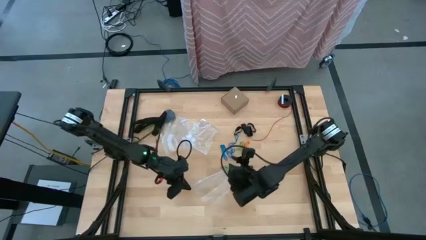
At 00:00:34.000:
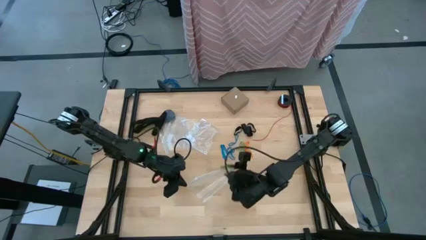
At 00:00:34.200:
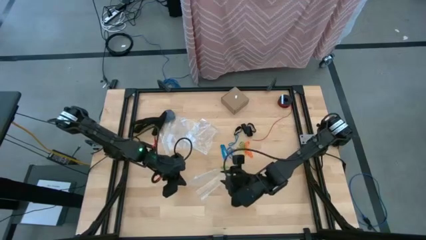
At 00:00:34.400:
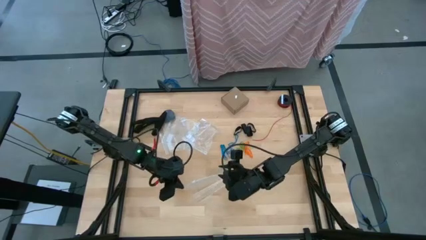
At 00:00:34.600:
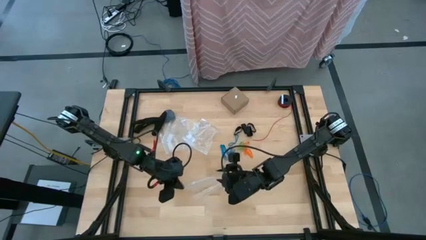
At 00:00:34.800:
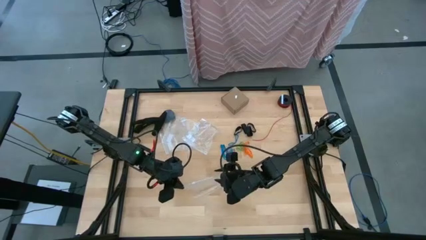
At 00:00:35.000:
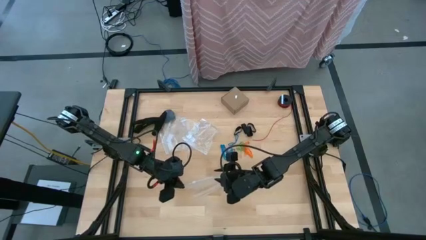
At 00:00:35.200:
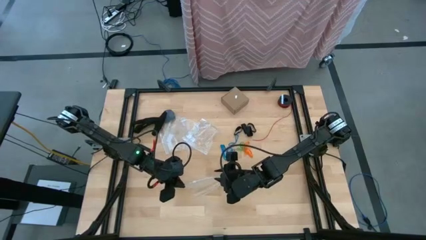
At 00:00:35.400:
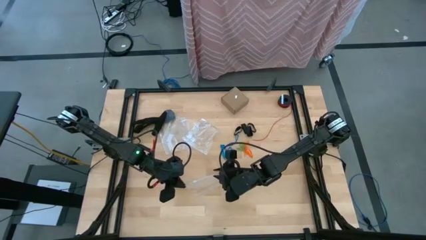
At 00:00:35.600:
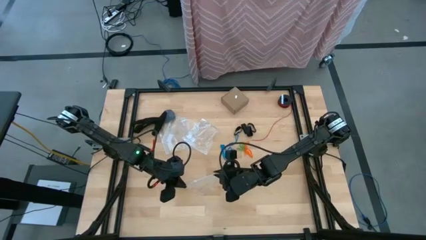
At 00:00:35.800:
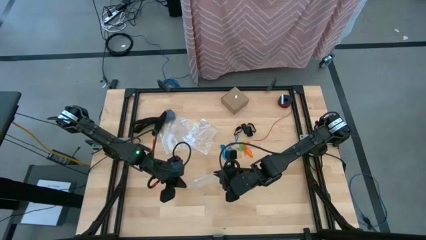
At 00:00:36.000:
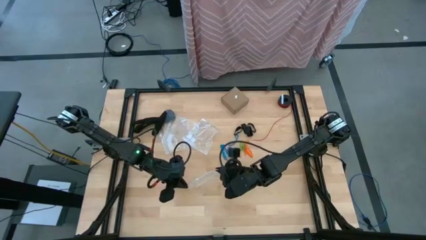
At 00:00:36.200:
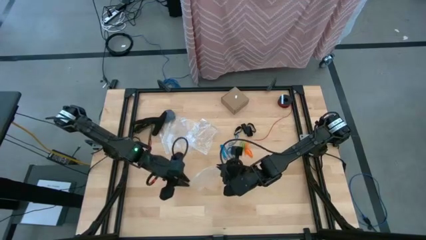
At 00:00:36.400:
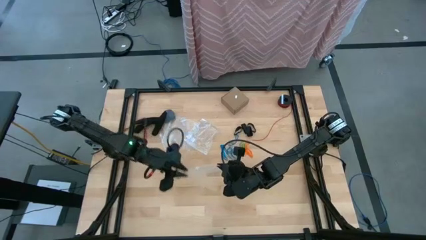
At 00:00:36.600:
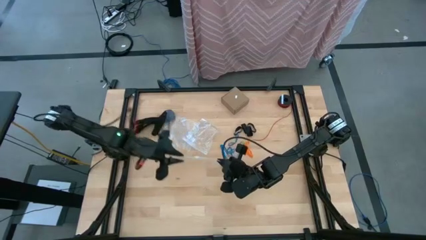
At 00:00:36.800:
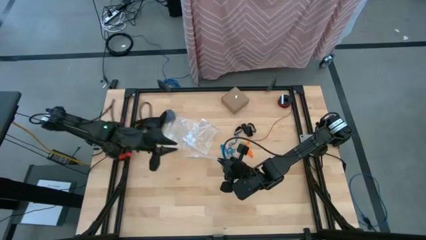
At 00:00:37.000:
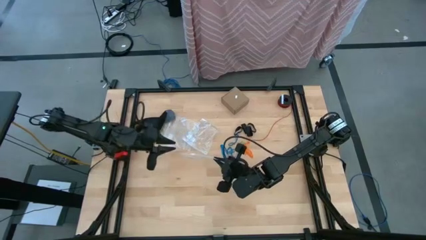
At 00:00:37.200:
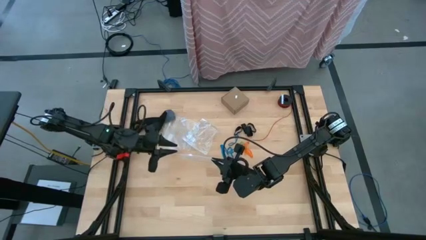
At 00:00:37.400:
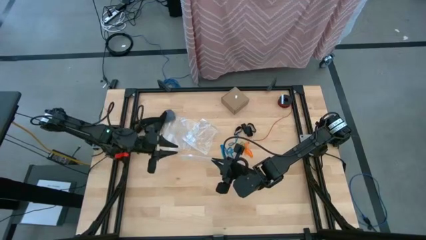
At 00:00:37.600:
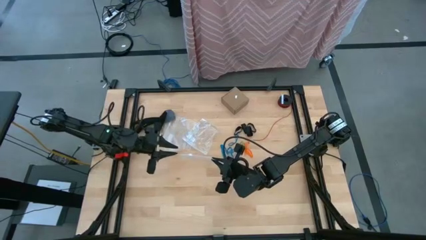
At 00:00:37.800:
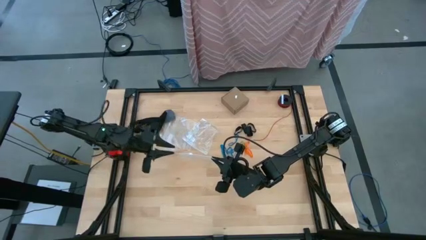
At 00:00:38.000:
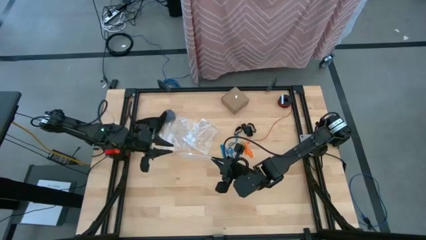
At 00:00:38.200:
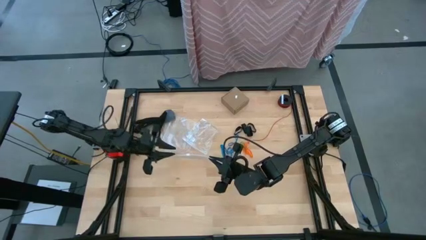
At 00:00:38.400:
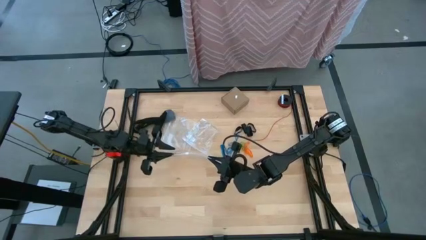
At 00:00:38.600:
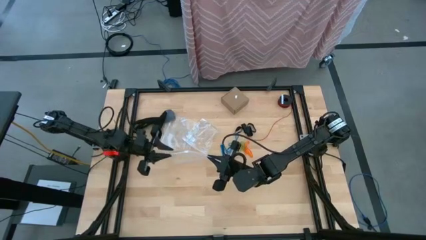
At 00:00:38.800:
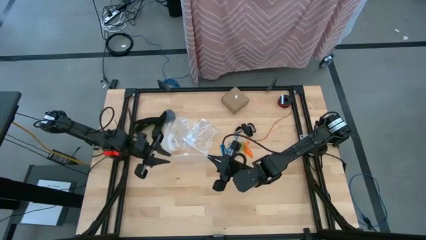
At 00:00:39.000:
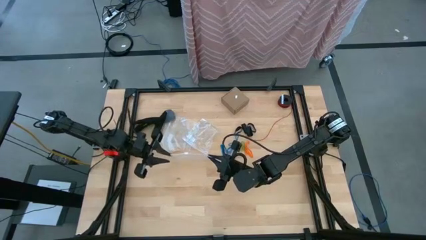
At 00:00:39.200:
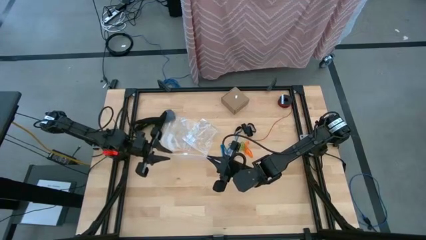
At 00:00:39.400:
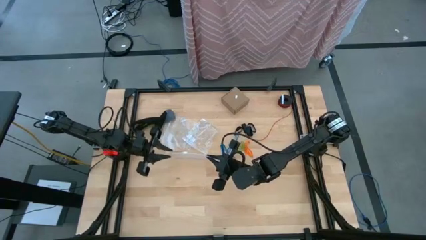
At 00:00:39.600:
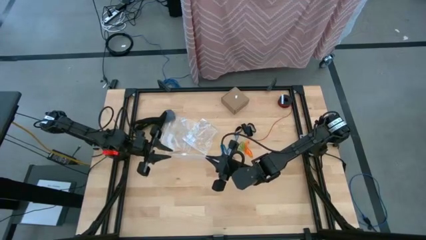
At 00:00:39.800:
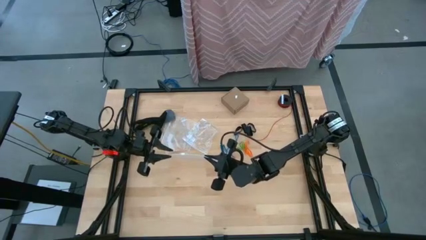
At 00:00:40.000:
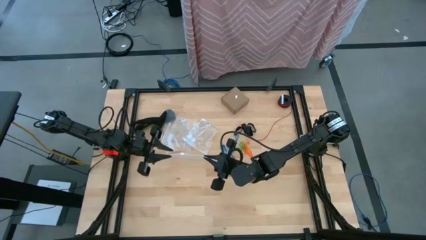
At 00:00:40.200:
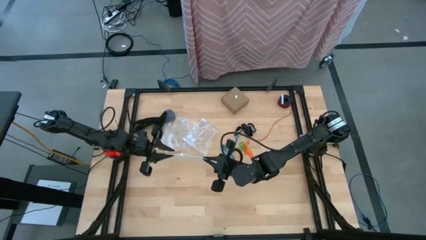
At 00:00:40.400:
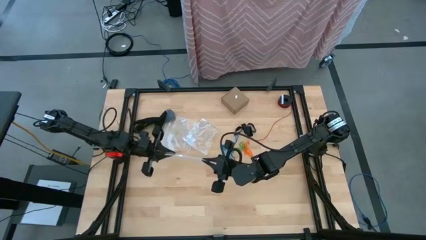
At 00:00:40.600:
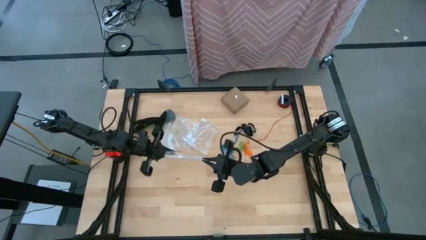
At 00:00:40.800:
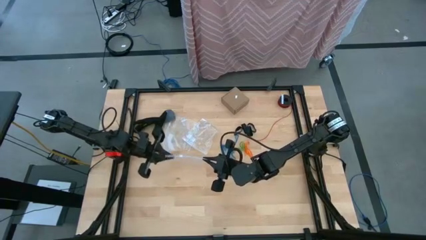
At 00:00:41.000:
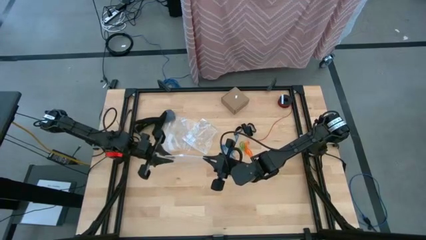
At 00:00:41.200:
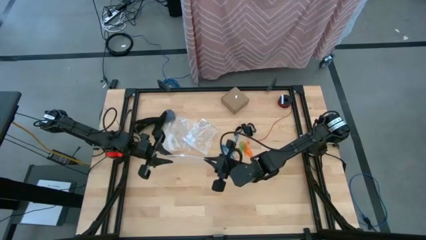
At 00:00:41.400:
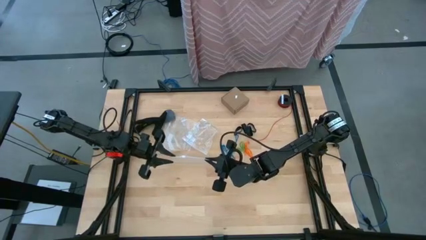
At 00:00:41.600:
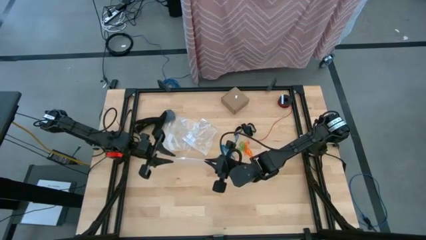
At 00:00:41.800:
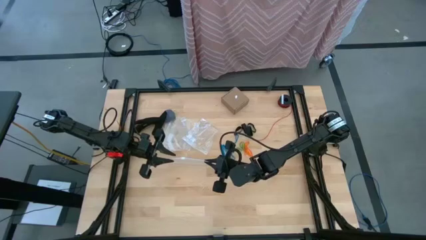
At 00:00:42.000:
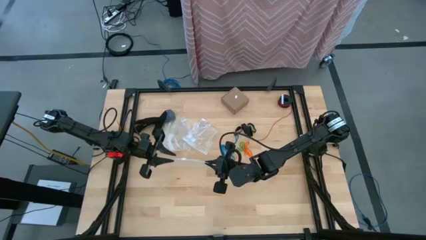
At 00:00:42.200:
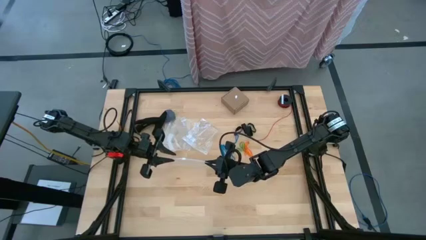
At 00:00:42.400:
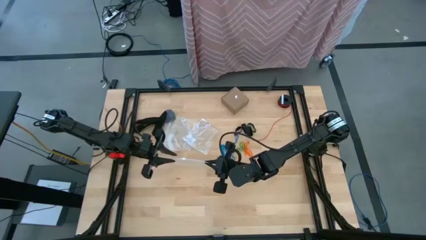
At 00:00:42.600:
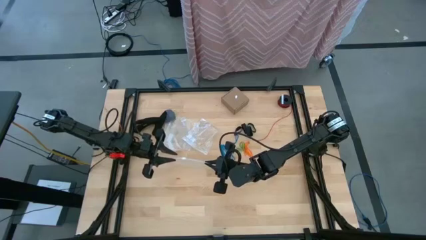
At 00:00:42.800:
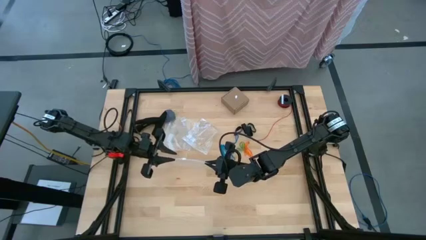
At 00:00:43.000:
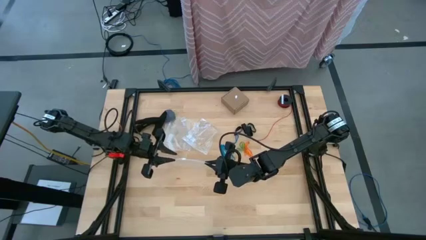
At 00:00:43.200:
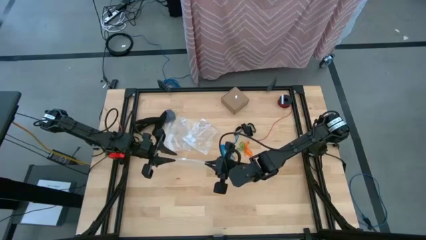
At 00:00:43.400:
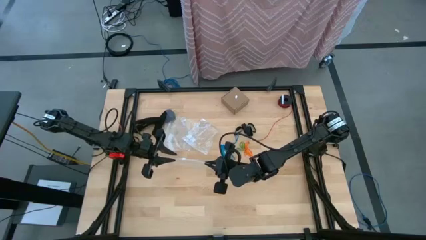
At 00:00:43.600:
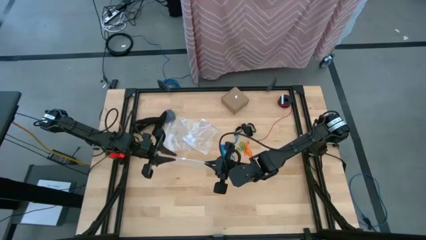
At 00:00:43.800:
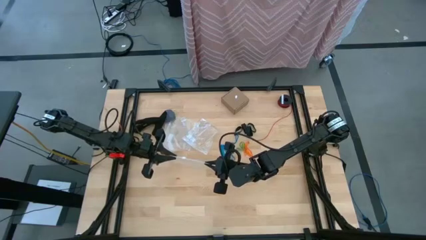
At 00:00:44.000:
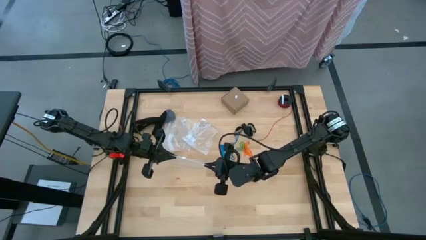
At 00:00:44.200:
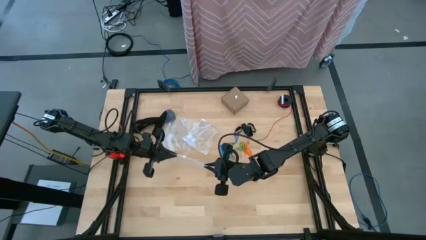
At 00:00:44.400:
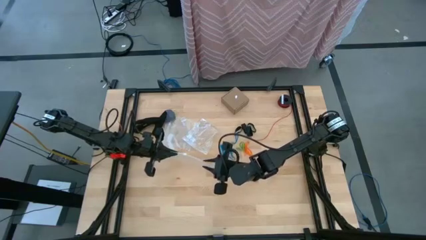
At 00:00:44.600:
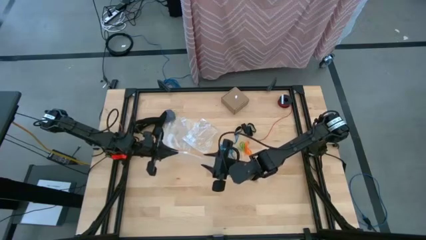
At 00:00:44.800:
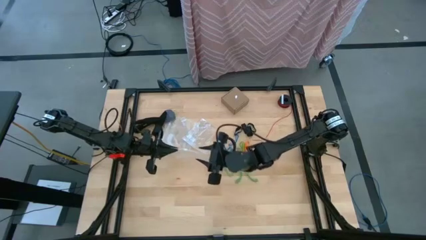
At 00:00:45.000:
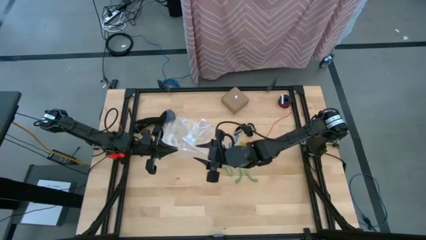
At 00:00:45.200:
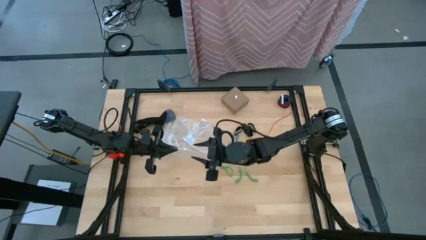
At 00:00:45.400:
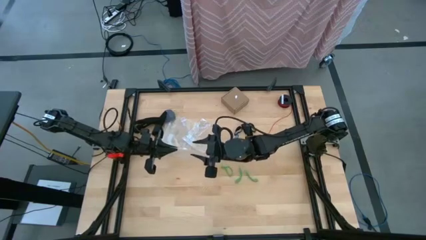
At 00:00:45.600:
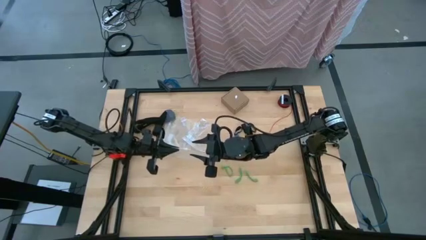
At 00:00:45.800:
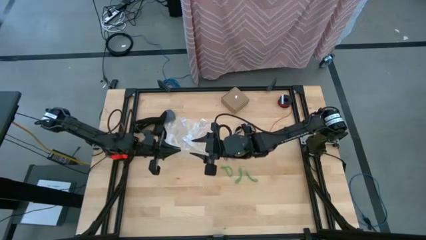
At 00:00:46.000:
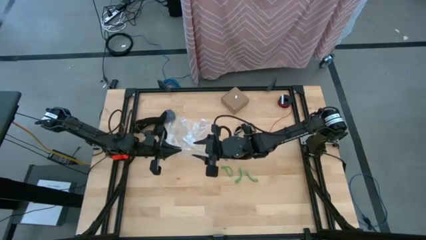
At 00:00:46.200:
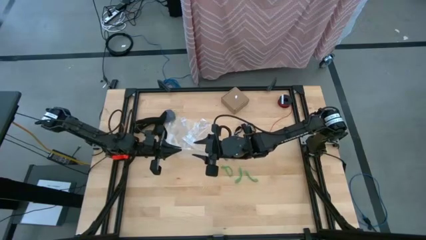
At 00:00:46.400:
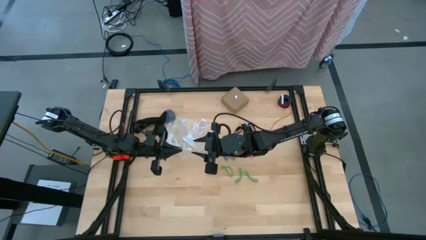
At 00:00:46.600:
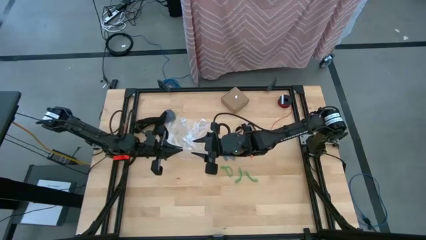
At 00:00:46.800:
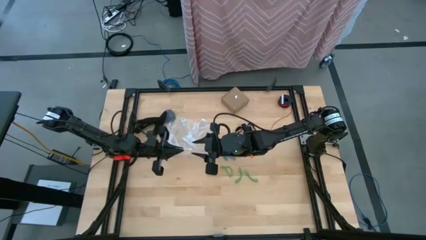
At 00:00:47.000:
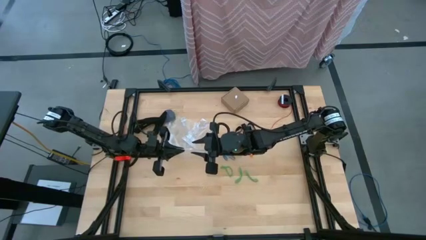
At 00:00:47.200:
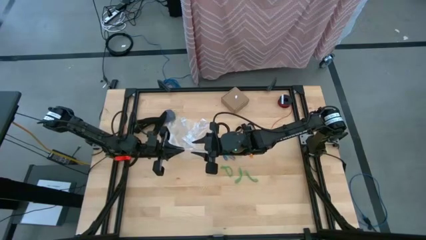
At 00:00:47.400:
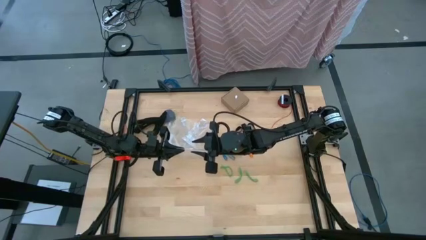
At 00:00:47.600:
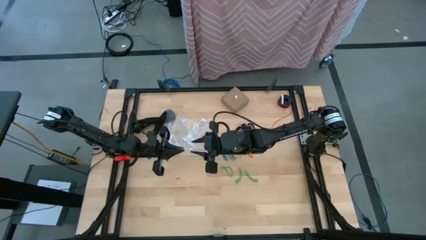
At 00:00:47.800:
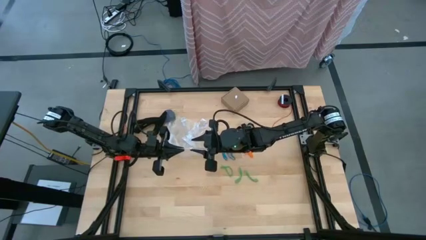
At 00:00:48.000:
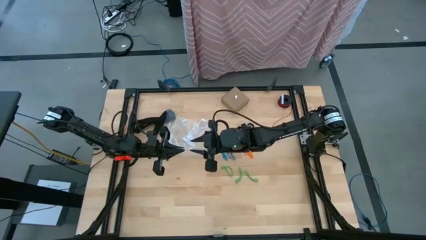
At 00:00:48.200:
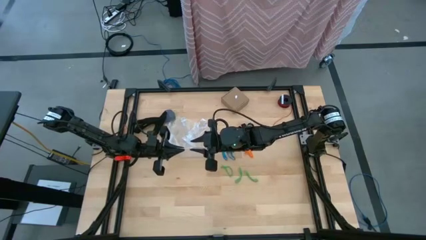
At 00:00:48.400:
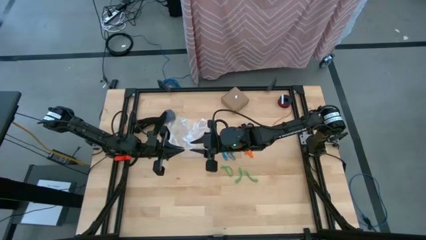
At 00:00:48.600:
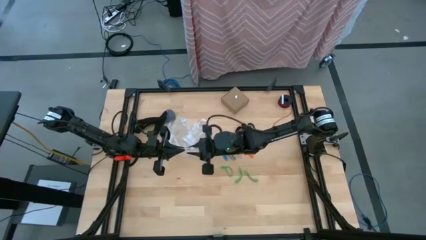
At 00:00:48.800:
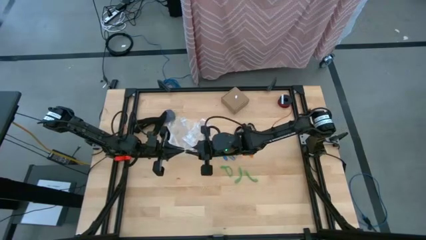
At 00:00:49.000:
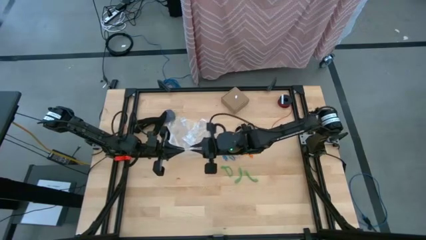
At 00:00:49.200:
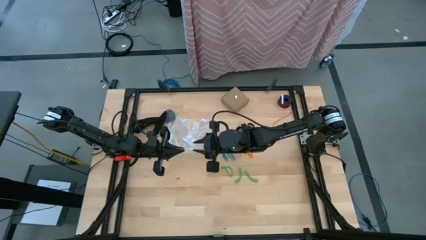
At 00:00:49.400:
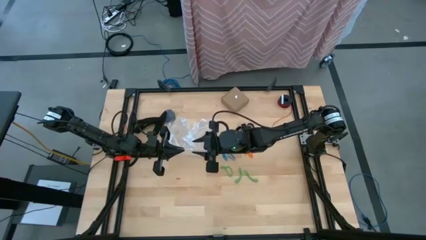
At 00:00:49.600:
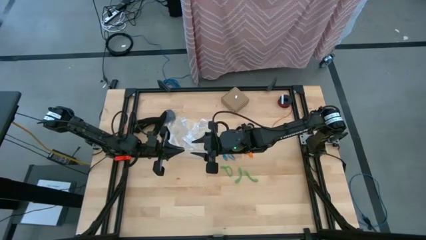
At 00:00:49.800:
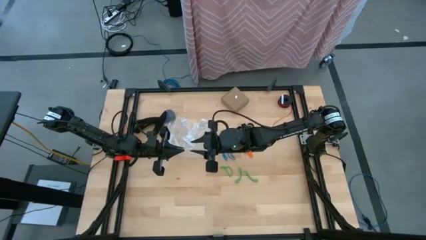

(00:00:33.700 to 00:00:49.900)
Task: Sort rubber bands
Open the transparent zip bag
